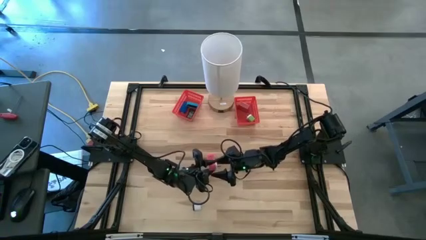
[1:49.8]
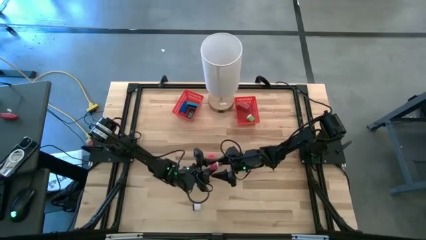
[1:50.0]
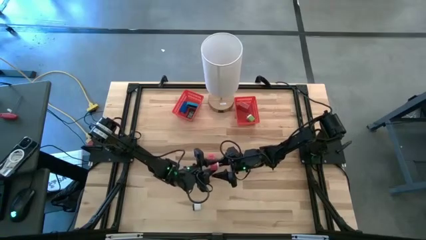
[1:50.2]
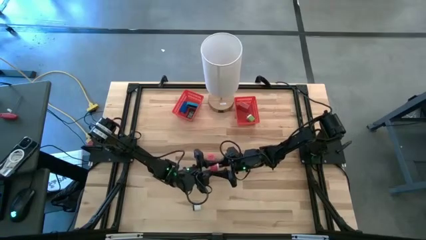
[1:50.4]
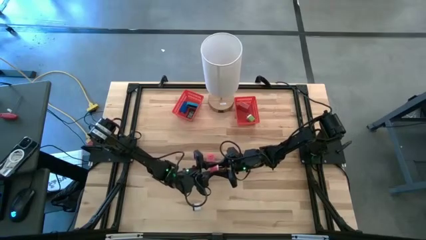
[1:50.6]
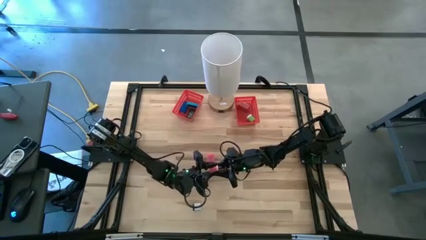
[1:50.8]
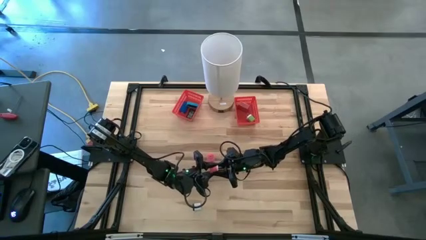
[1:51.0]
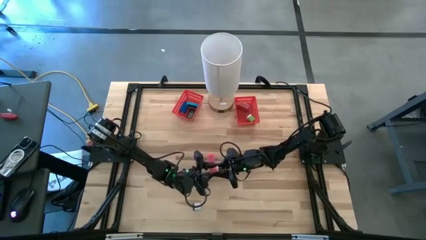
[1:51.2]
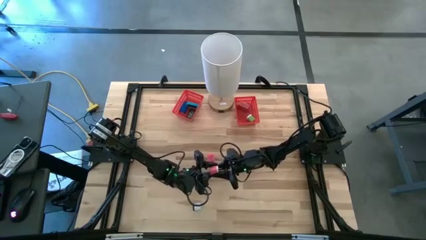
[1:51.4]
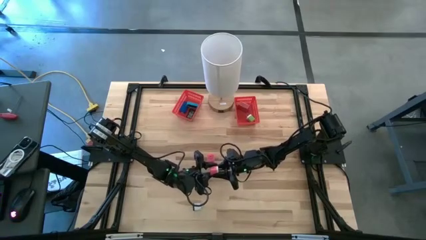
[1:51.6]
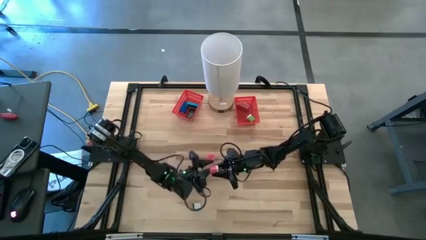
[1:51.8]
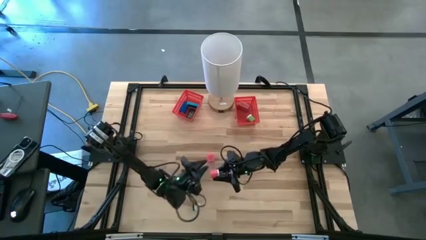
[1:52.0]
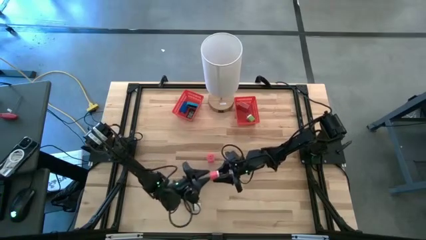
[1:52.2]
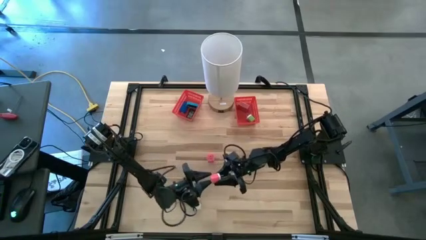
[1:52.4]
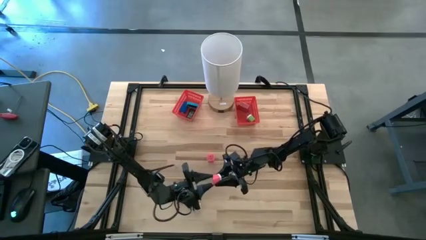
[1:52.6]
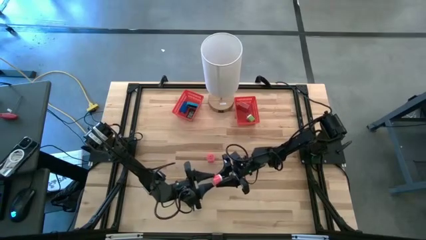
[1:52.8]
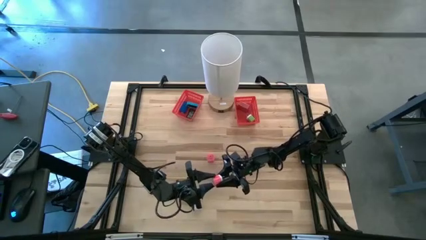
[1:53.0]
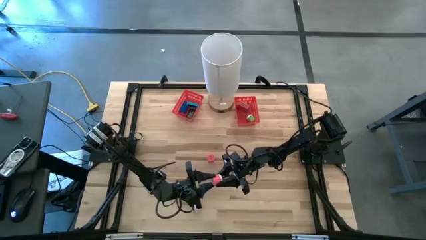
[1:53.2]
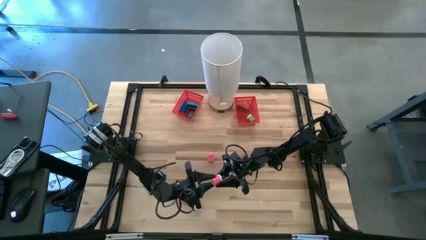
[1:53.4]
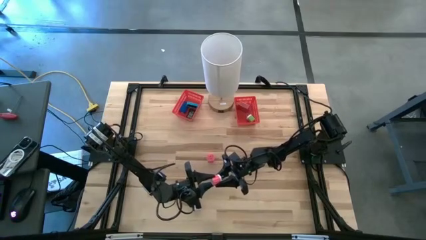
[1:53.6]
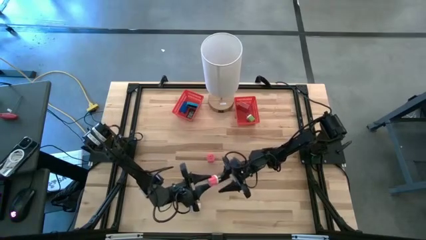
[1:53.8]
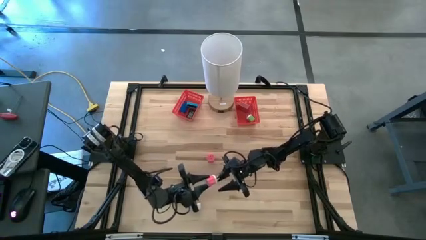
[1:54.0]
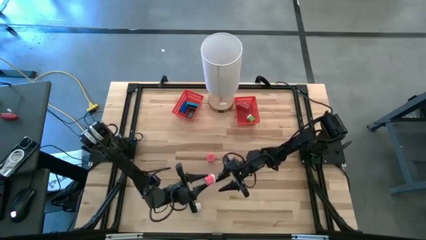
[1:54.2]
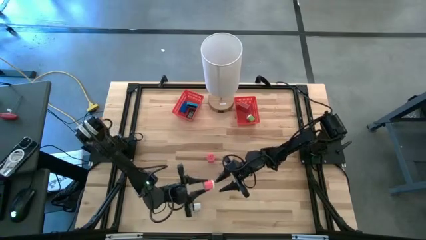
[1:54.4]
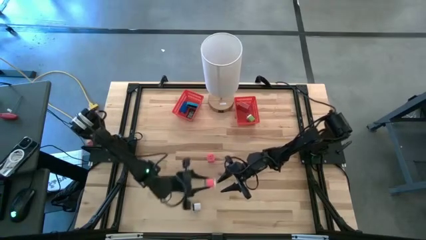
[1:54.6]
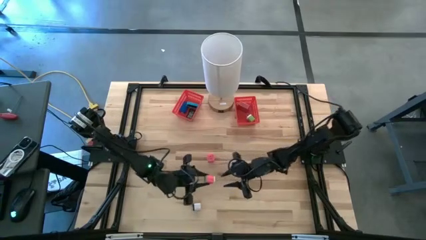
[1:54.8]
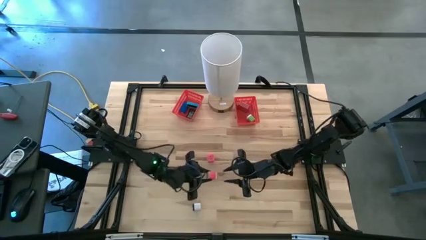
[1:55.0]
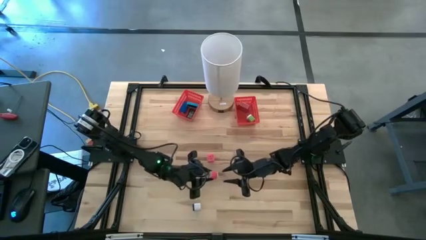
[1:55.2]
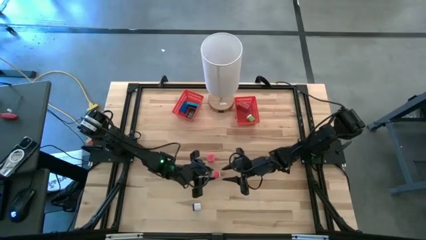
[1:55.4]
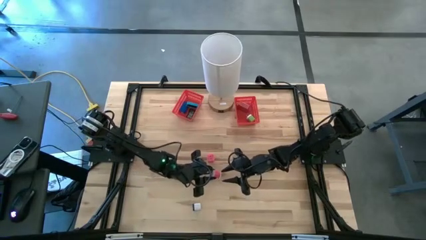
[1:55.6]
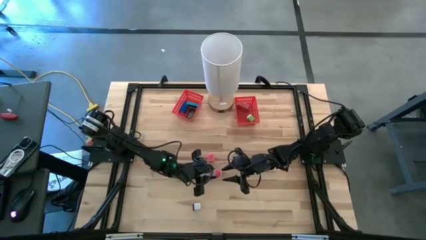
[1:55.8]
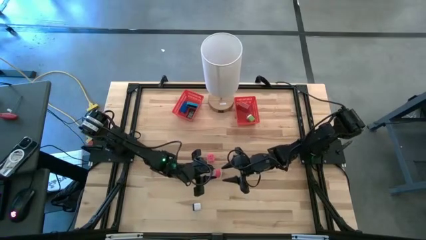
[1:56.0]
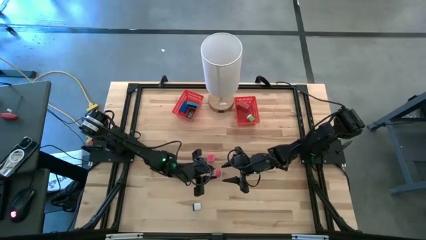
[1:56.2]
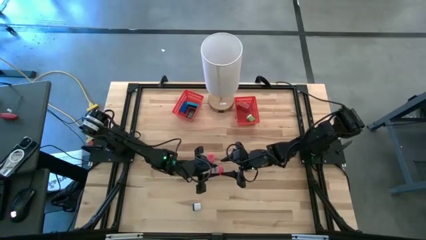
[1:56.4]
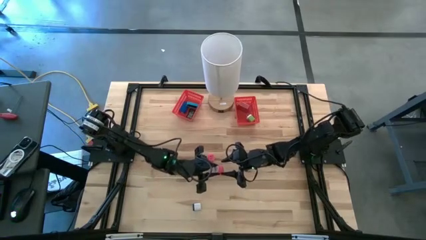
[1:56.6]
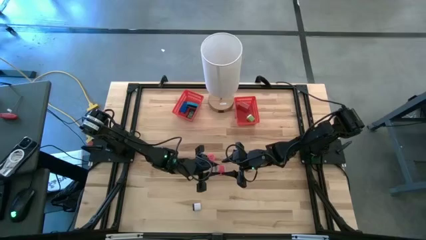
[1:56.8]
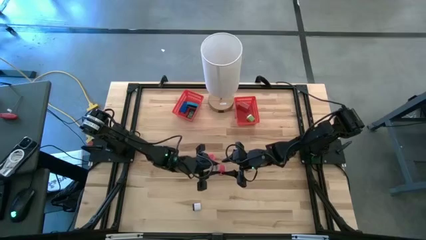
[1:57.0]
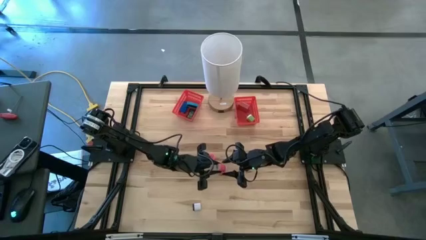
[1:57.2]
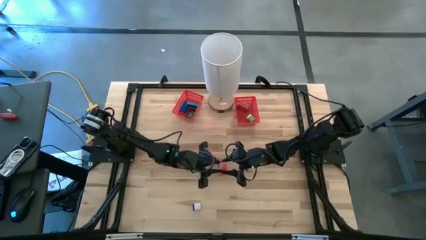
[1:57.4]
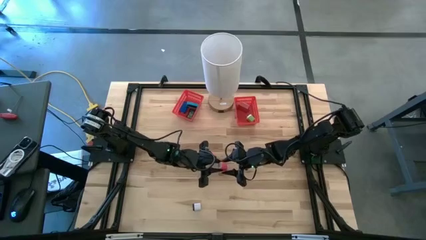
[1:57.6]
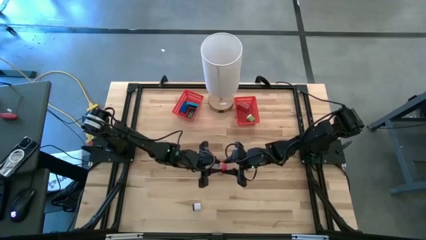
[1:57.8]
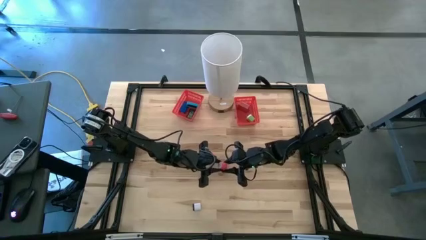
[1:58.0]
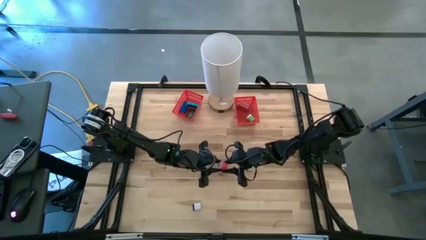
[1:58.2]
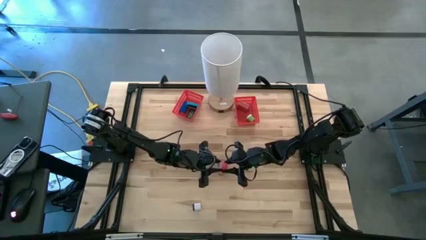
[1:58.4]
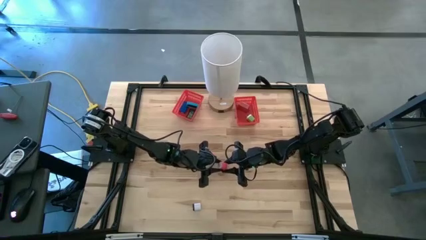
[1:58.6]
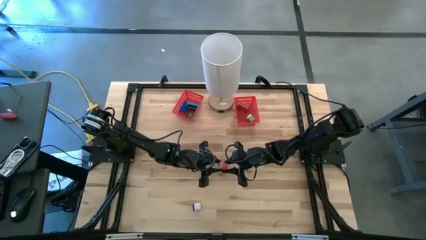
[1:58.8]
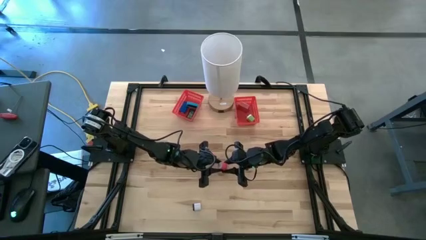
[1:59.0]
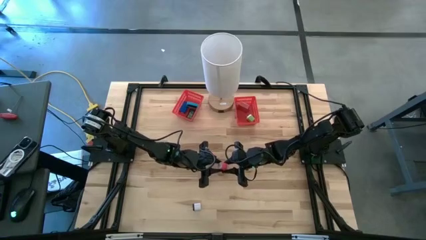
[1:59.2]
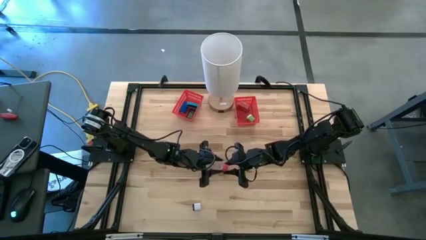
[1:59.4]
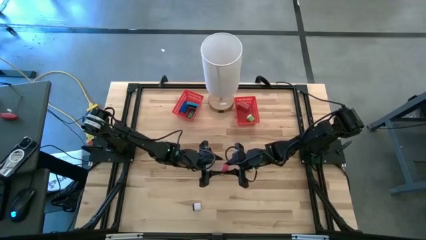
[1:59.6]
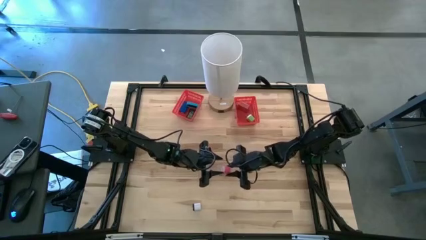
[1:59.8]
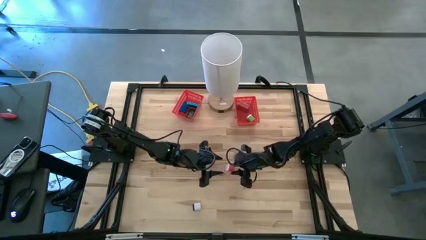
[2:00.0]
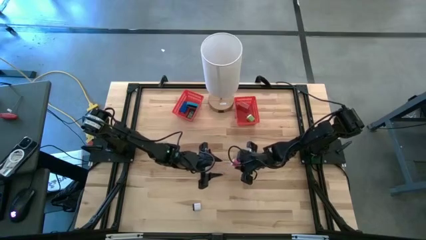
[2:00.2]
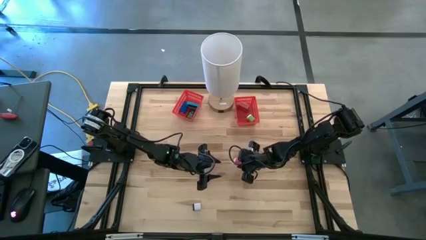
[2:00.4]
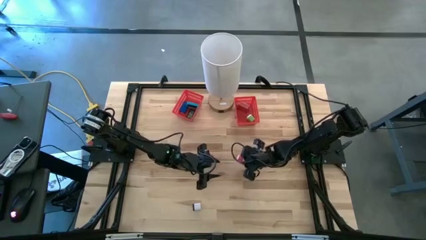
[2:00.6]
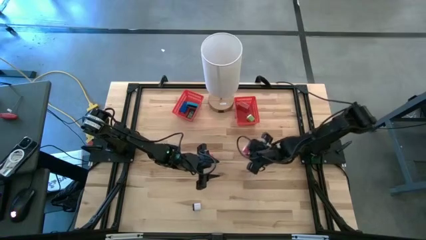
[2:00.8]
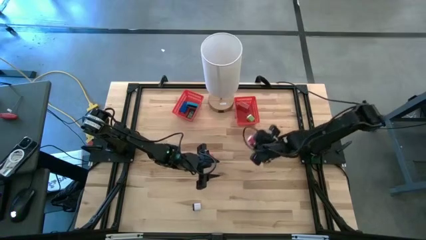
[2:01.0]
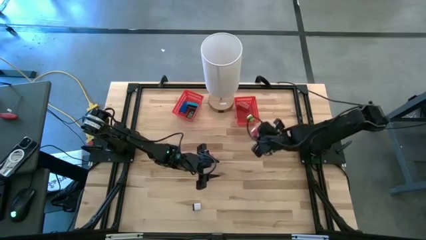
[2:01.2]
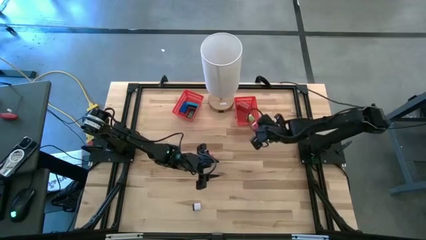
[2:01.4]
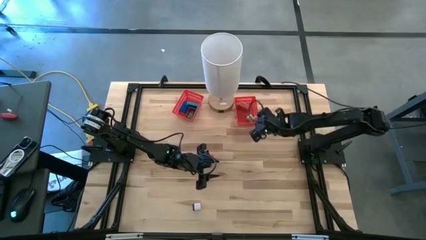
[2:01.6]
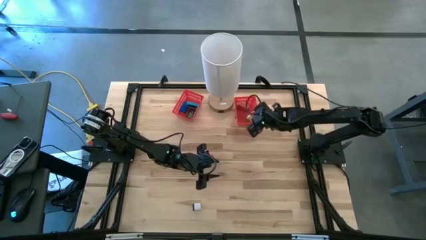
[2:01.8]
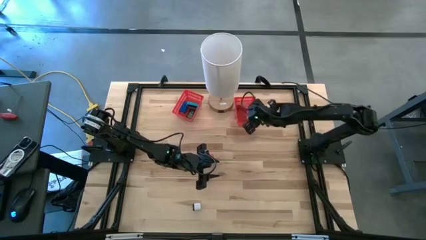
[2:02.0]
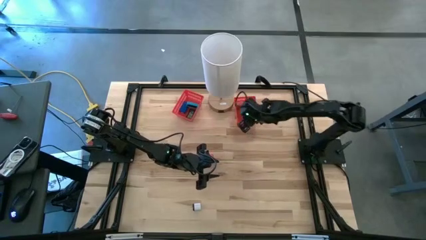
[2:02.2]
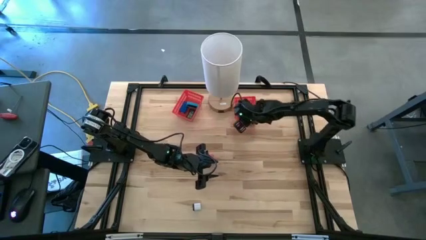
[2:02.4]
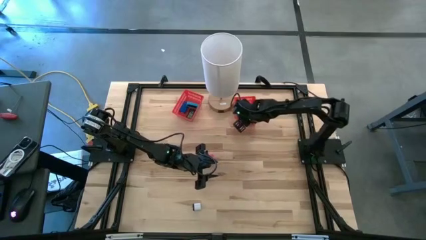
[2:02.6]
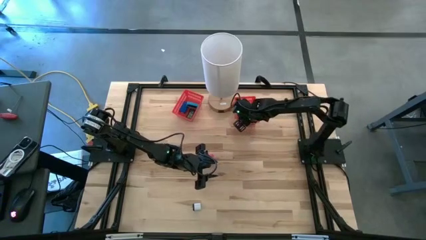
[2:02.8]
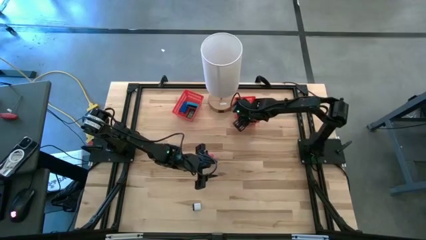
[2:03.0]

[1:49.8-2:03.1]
Task: Sort adapters and digital timers
Put the red charger adapter into the right red bin
